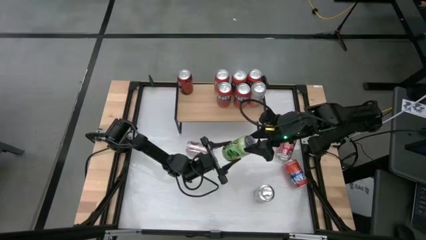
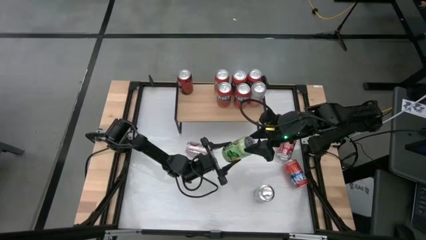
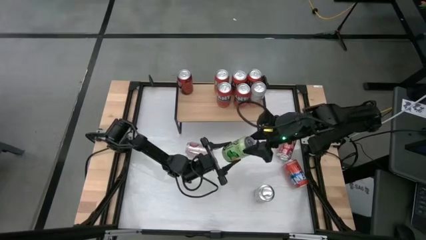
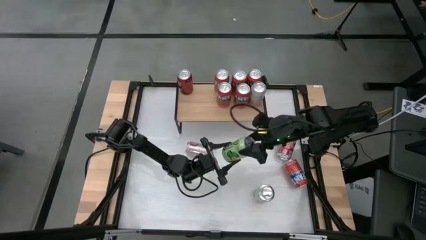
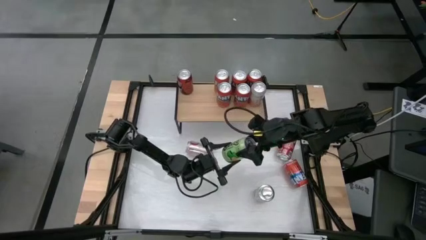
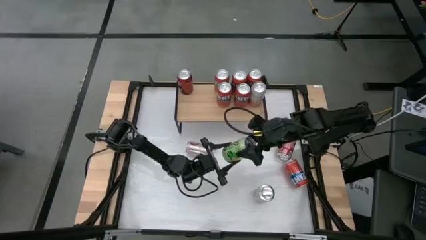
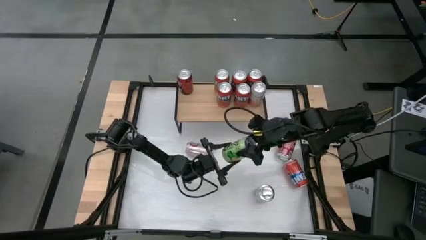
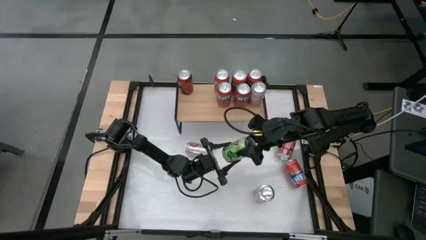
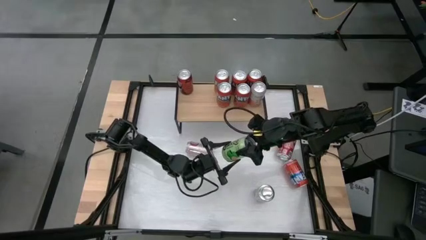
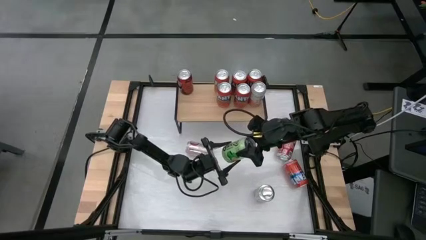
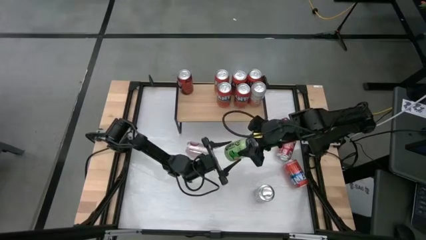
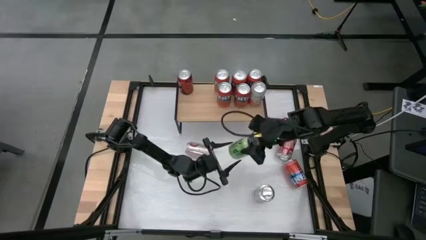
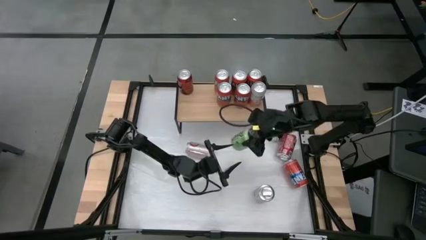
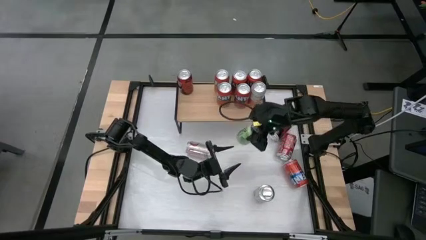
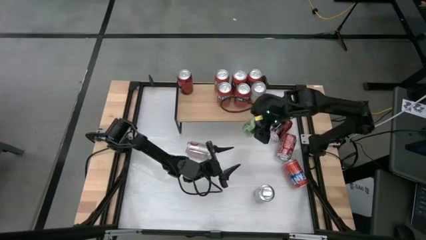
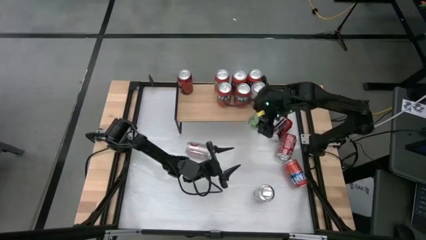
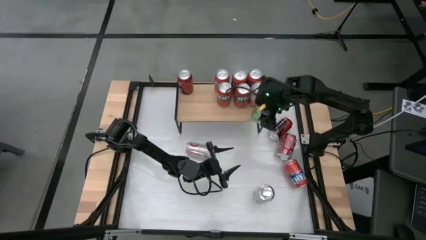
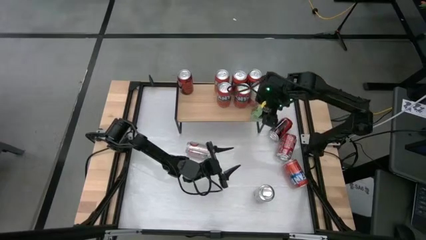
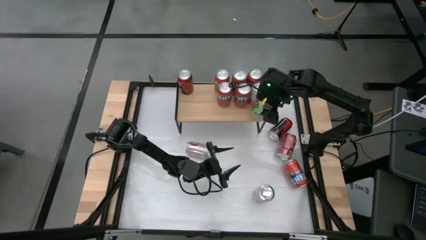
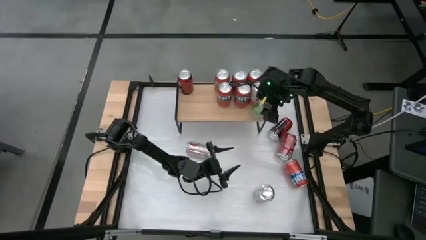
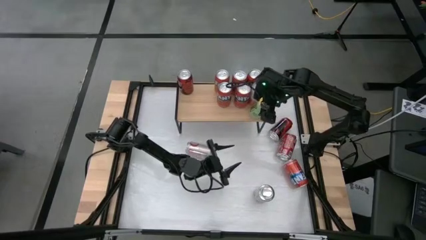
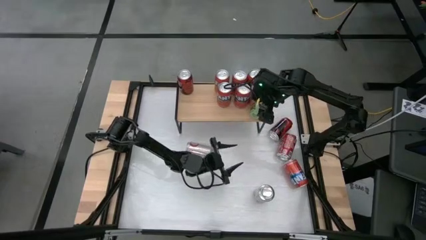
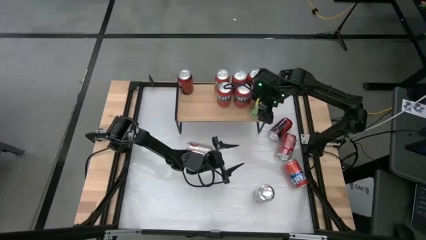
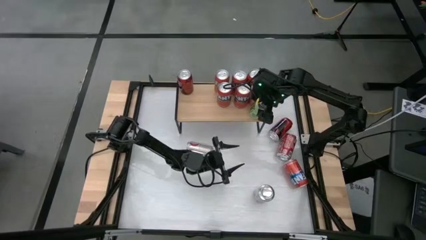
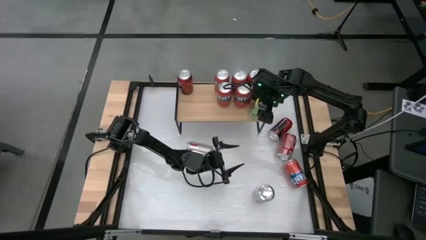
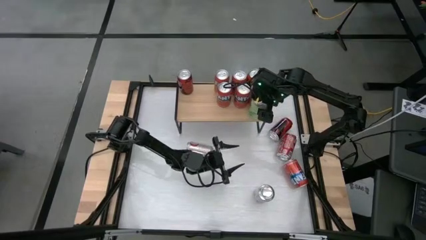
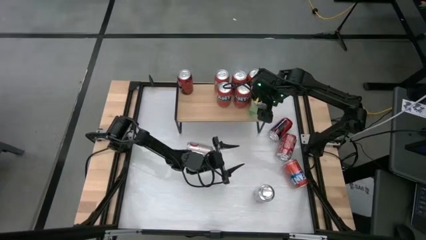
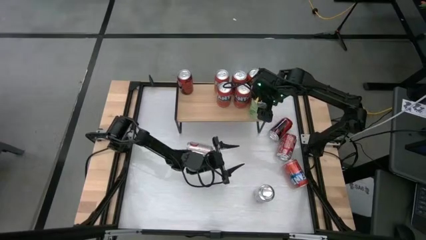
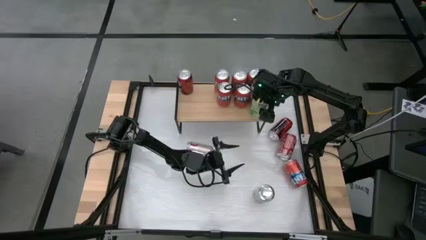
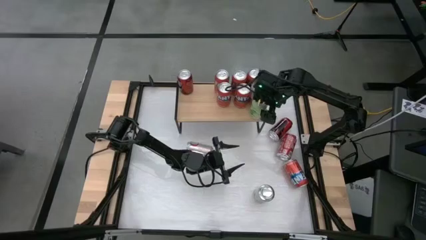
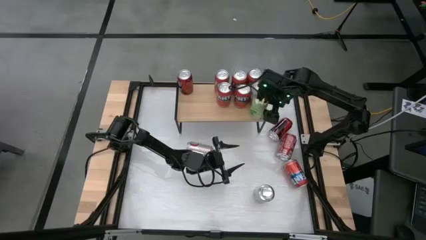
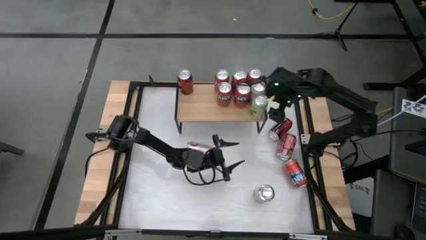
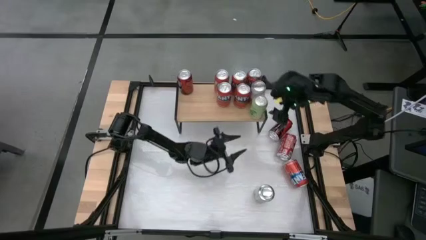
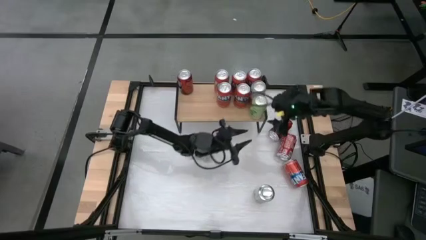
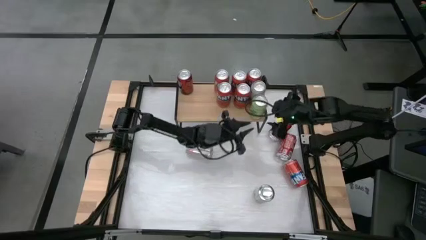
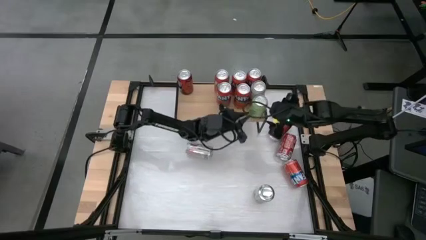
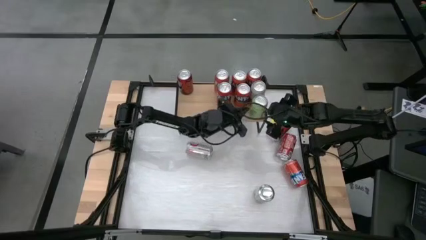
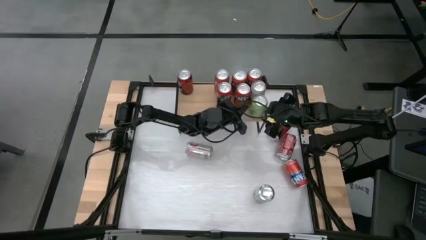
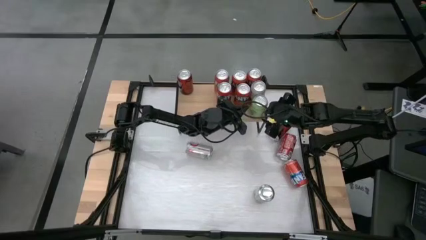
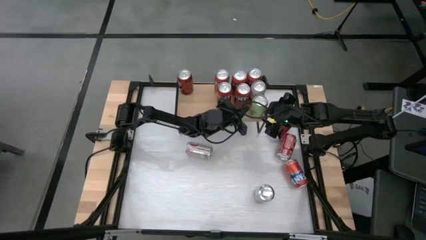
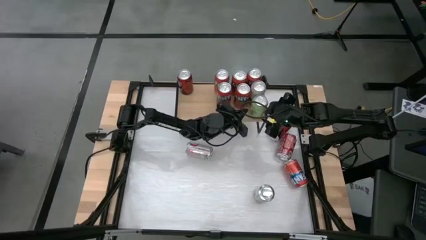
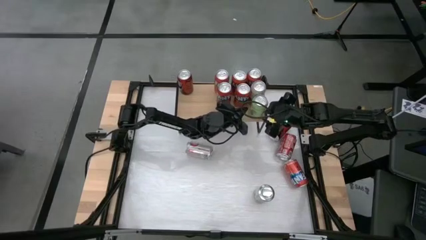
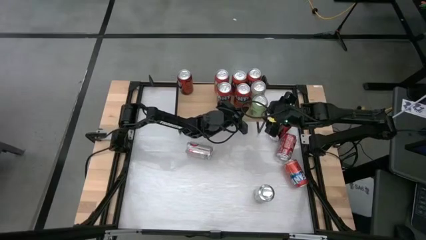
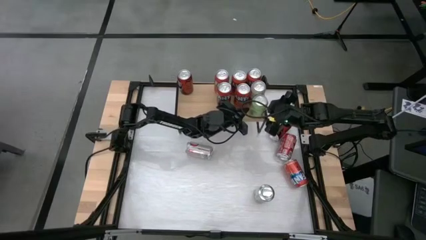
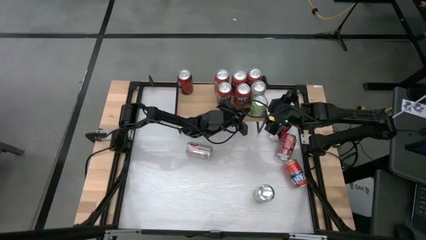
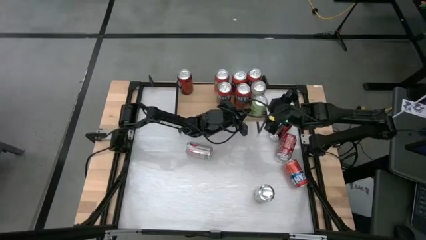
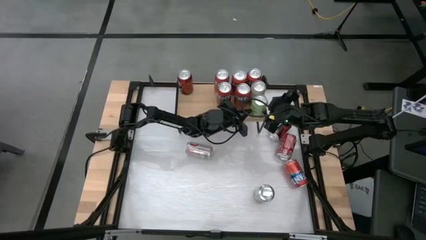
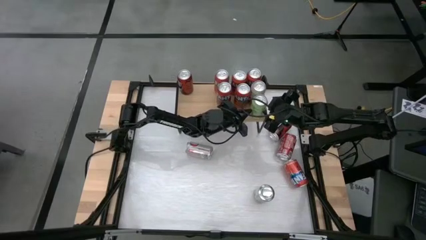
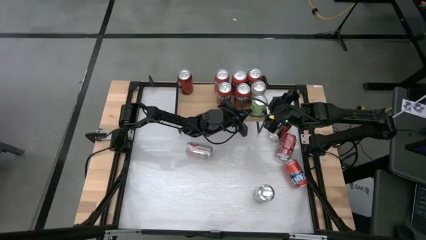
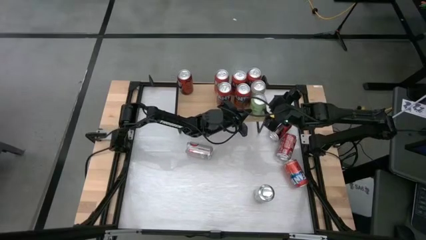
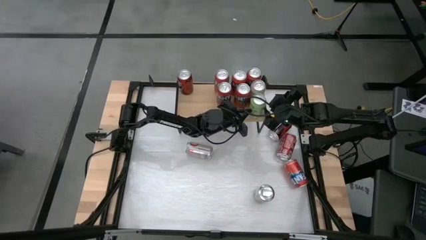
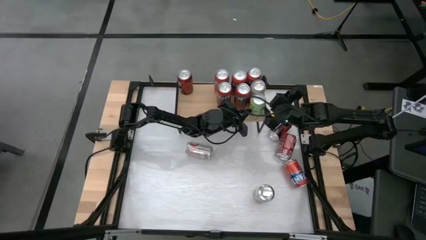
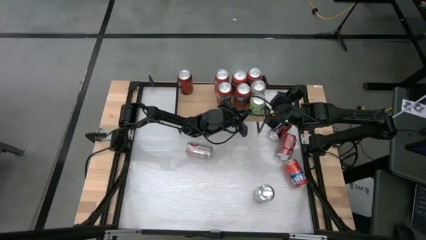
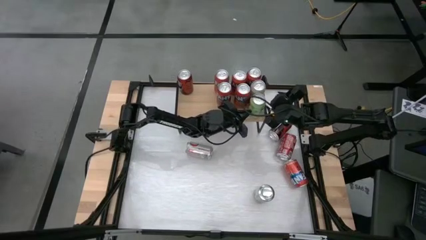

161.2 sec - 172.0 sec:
Task: Place canned beverage on shelf
Put the green soda can on the shelf

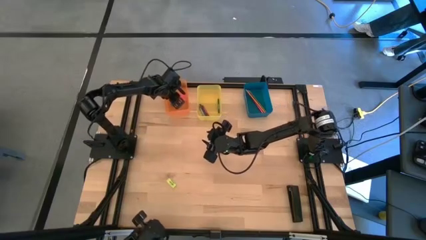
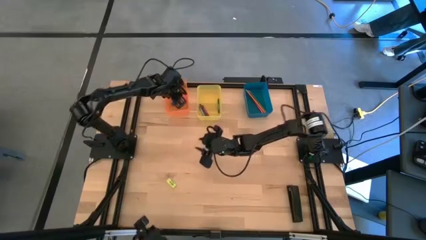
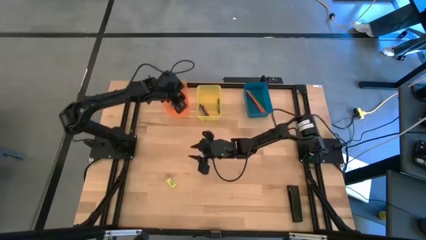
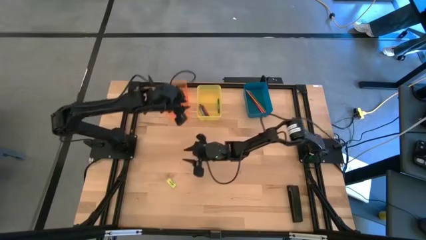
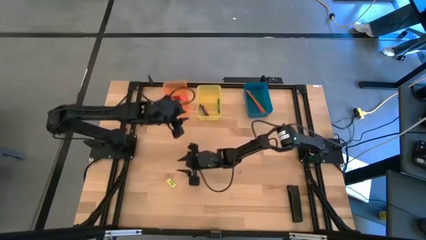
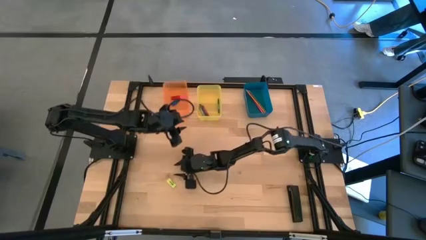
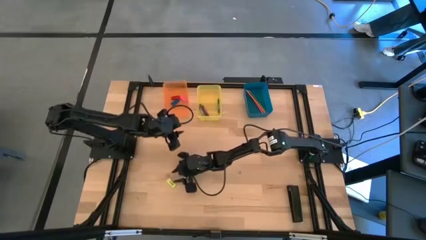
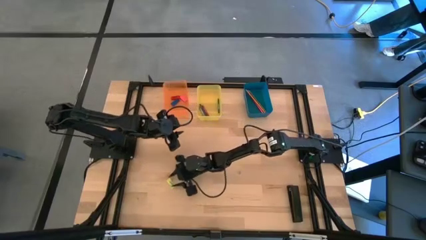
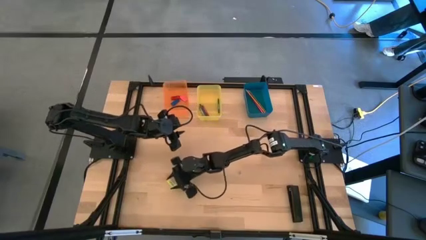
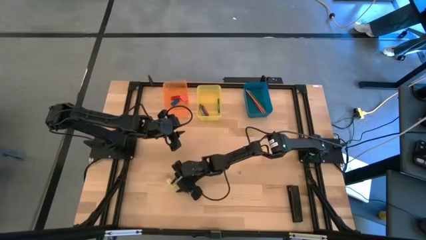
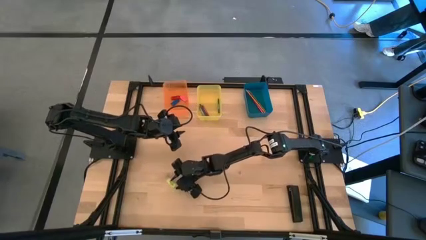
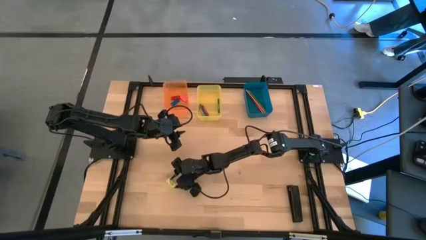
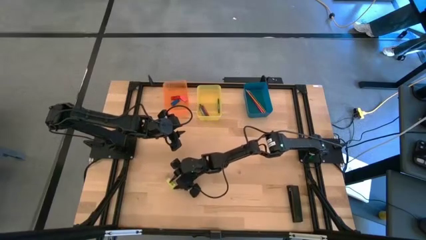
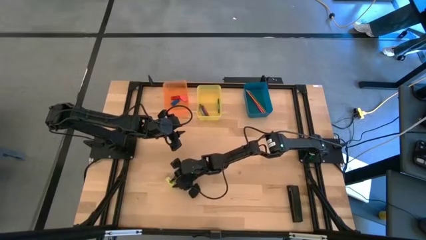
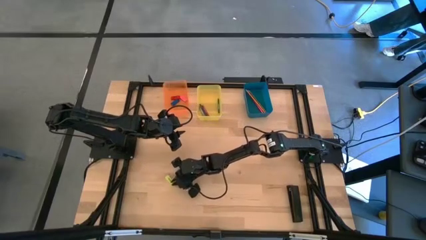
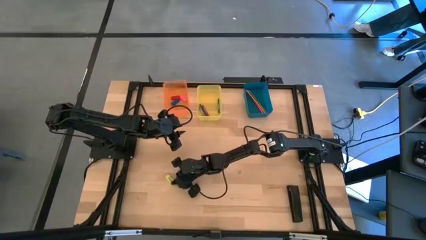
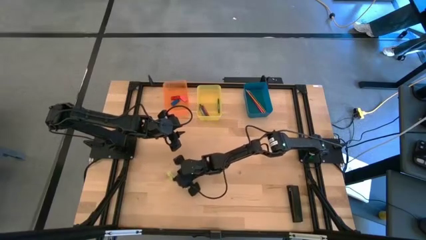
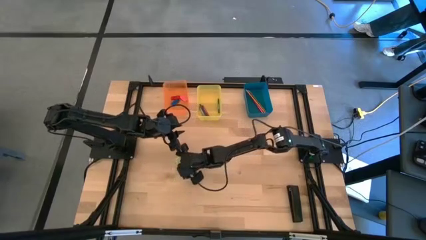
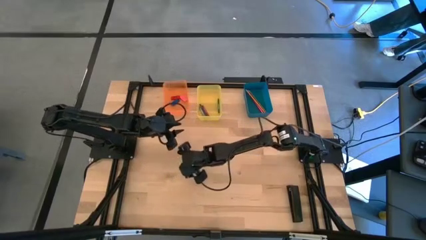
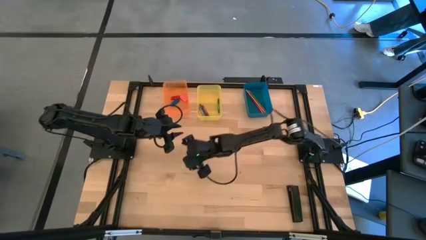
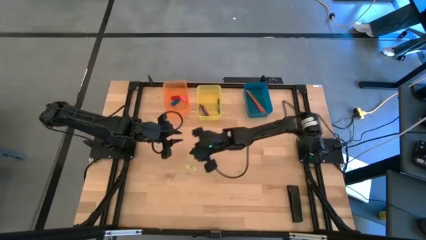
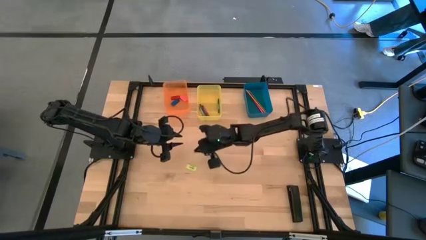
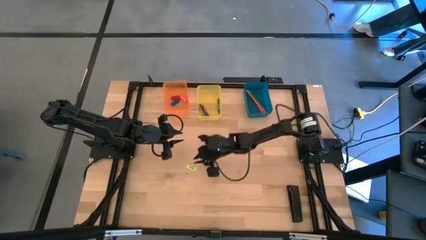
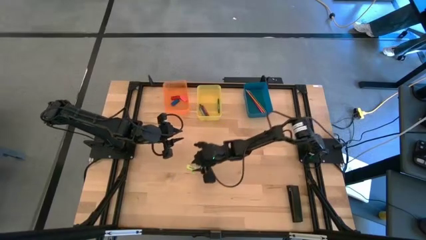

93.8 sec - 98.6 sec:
Task: Sort crayons/erasers/pens/pencils in bins
Put the yellow eraser into the orange bin
